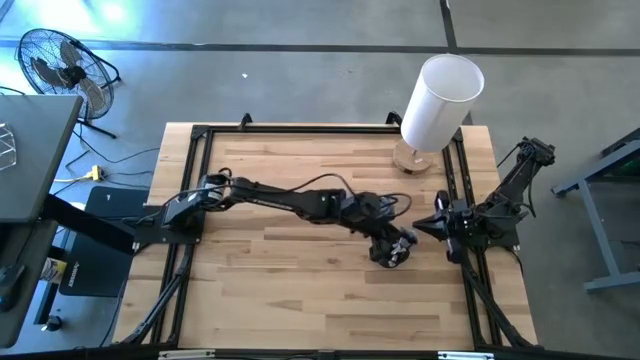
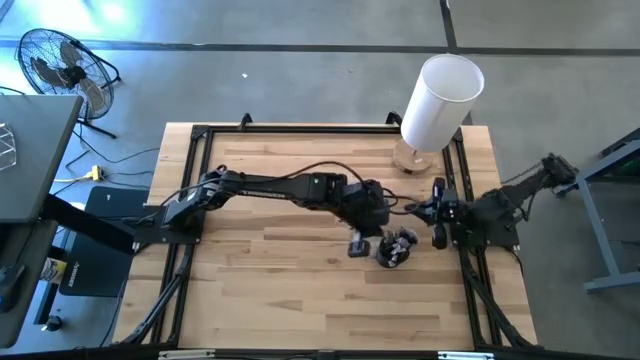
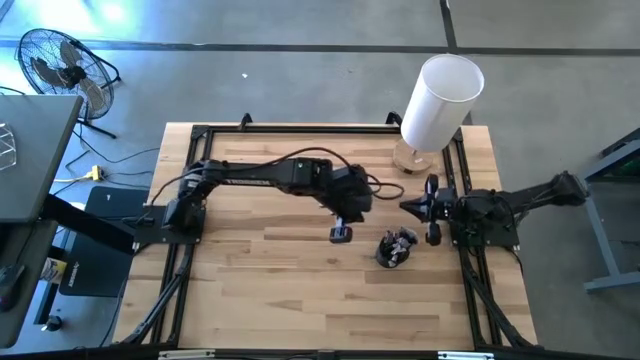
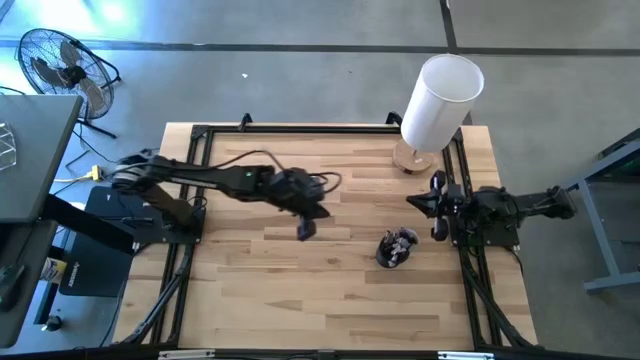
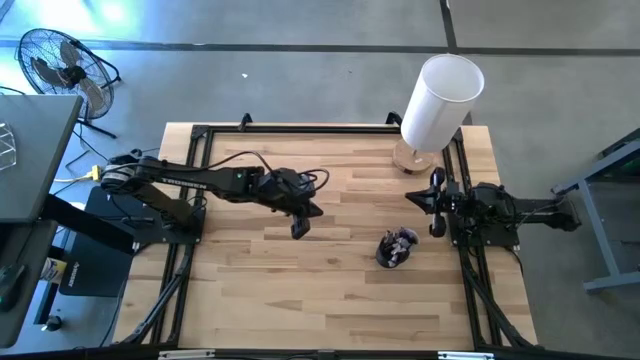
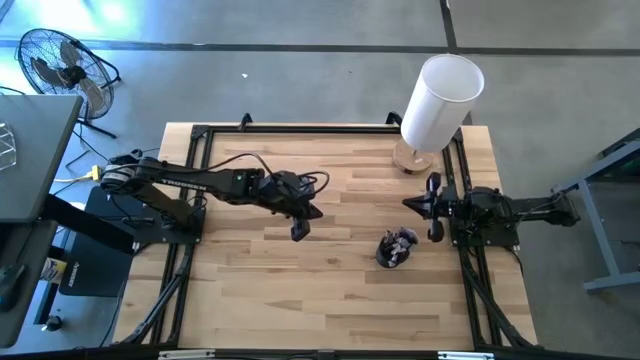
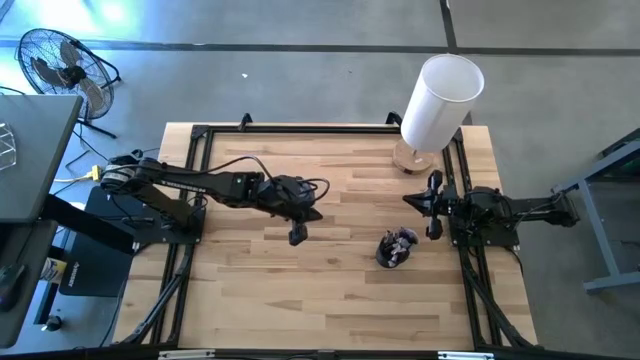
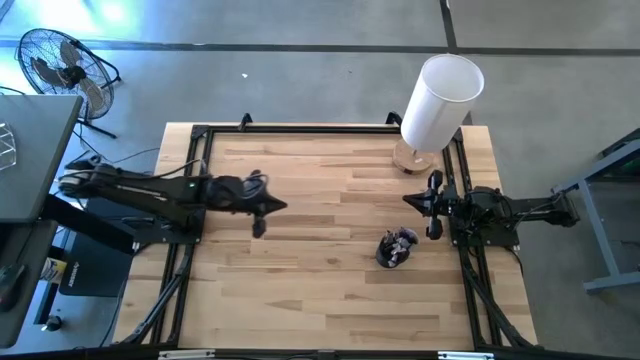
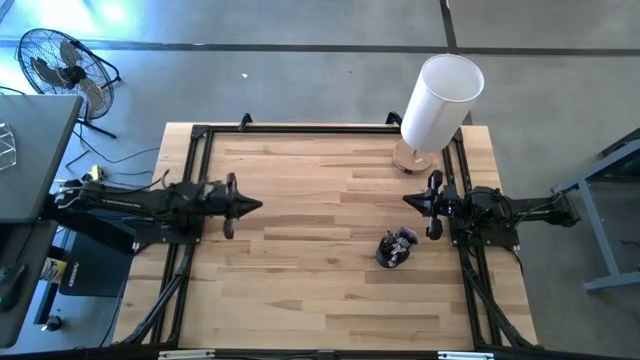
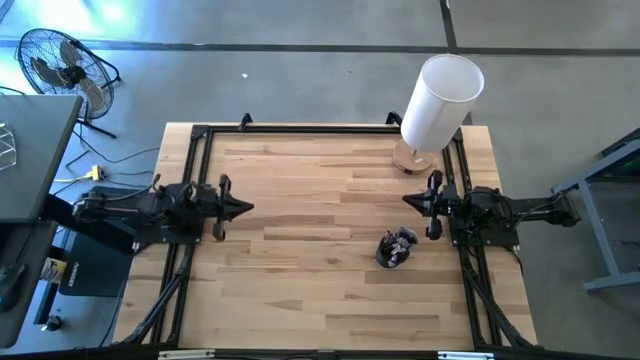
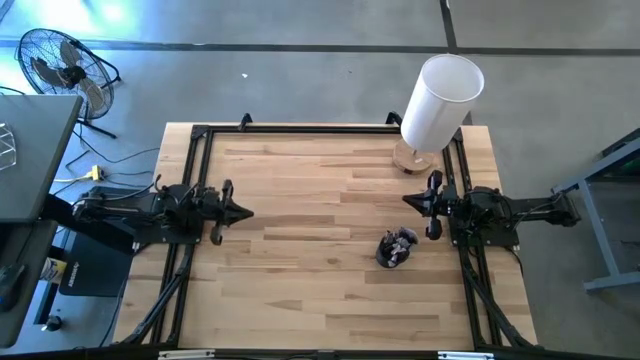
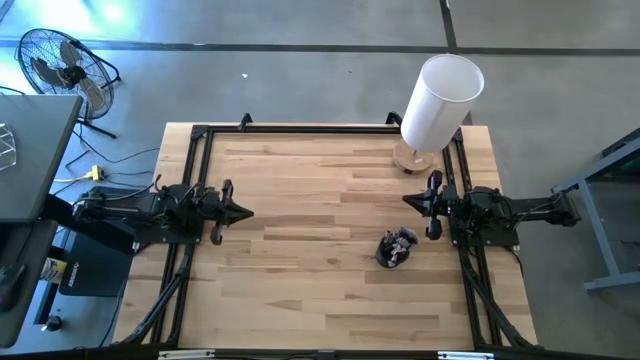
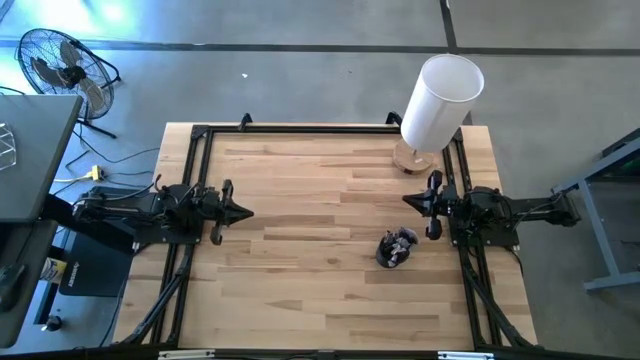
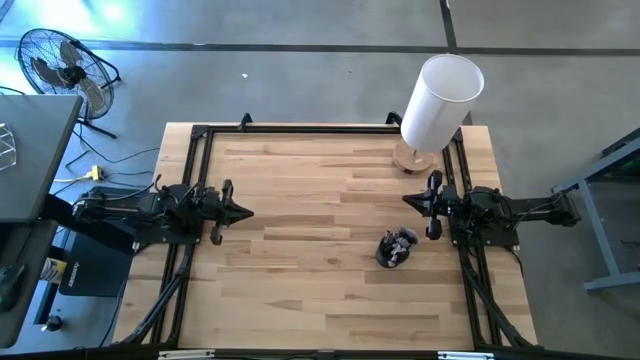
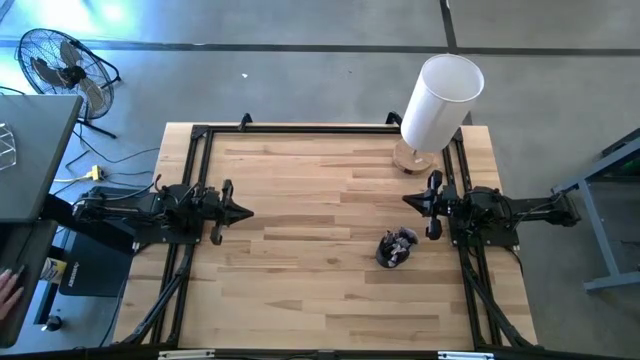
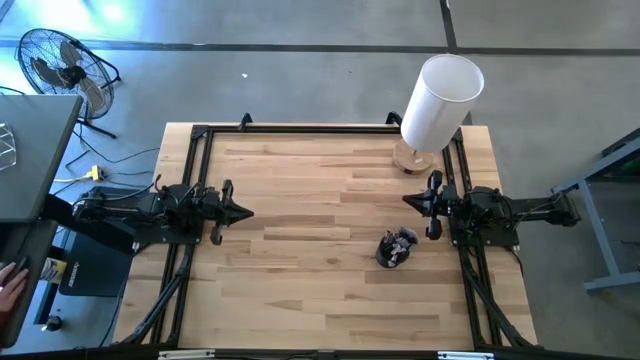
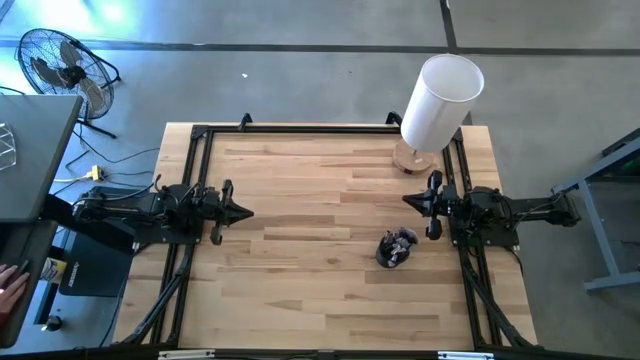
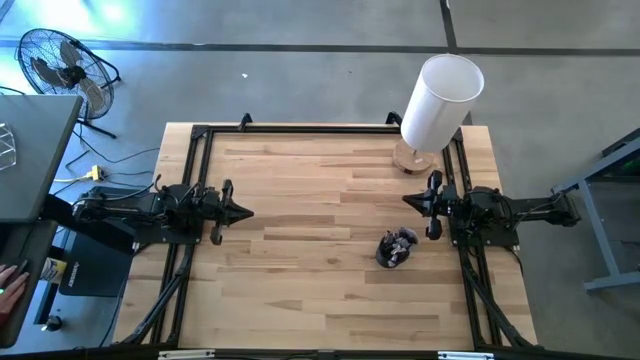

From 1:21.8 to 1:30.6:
Task: Put items in baskets/containers
Return to Home Position

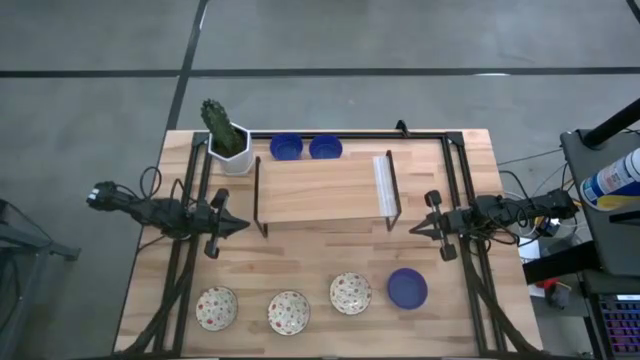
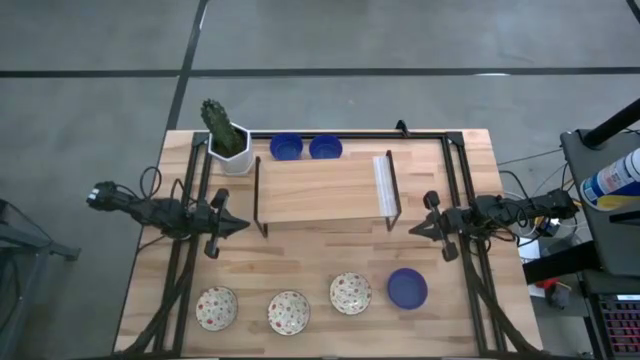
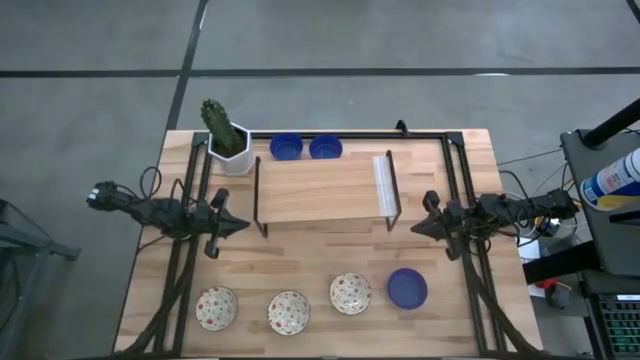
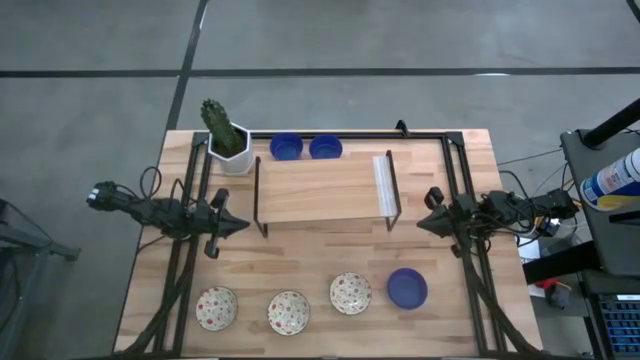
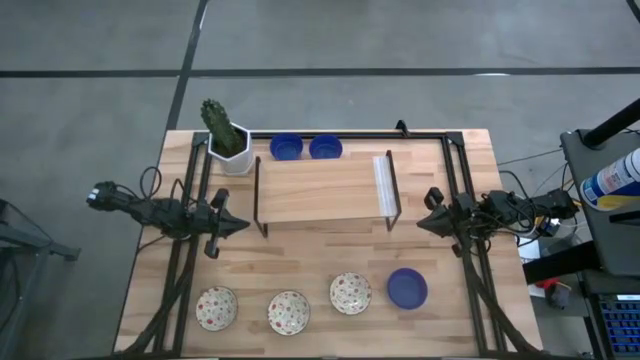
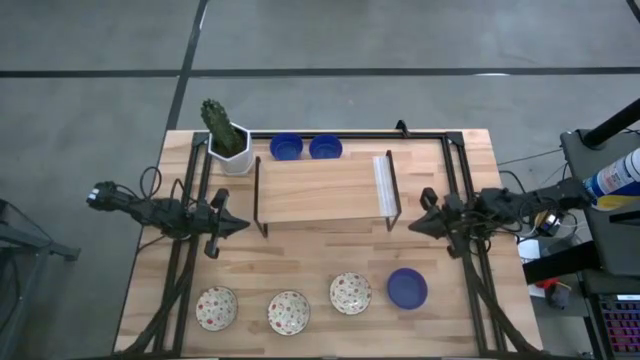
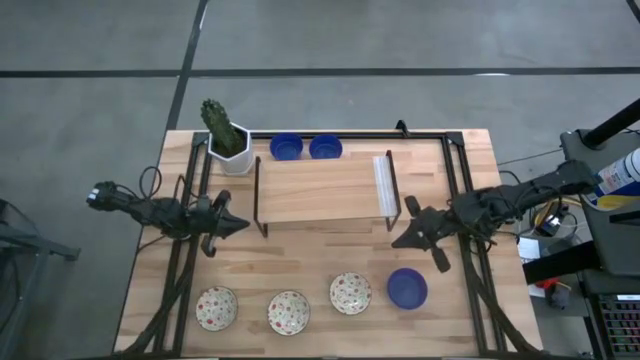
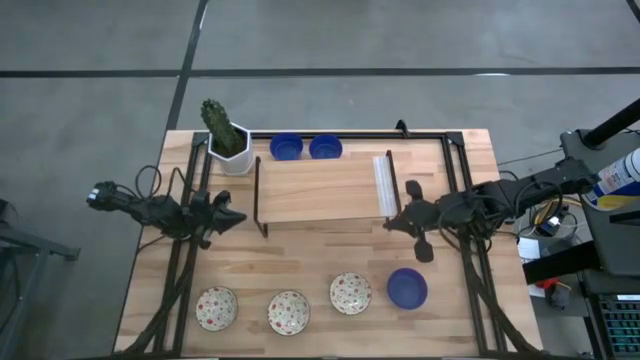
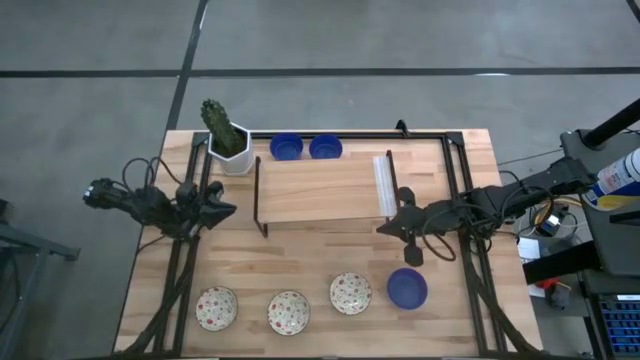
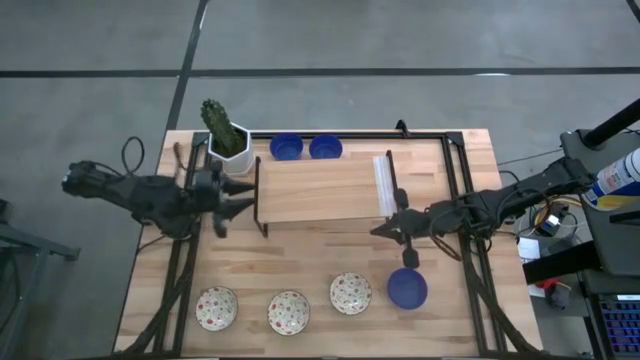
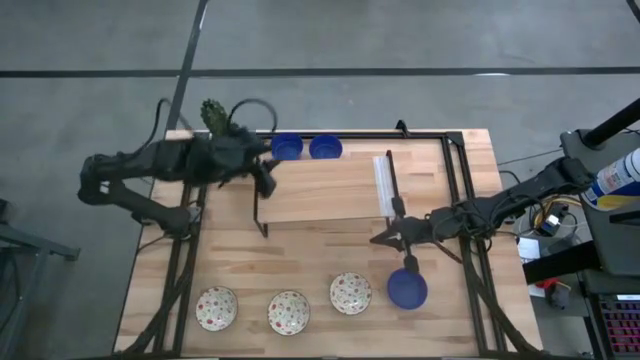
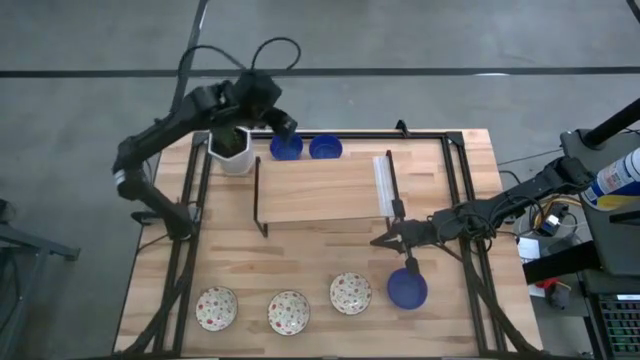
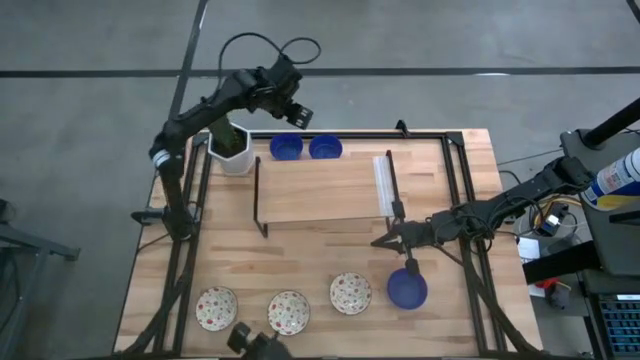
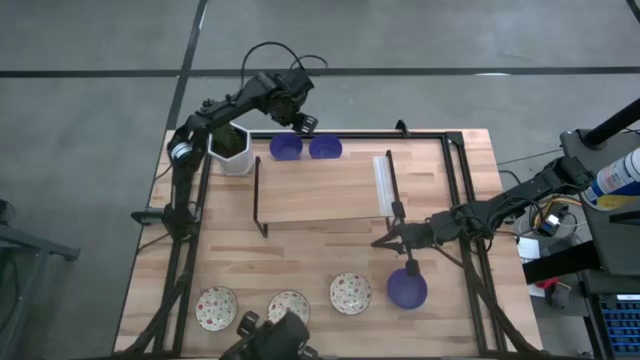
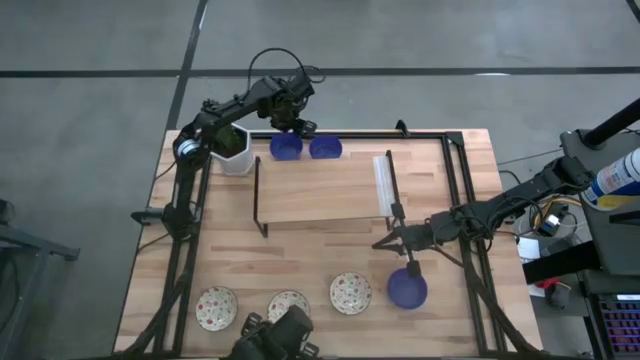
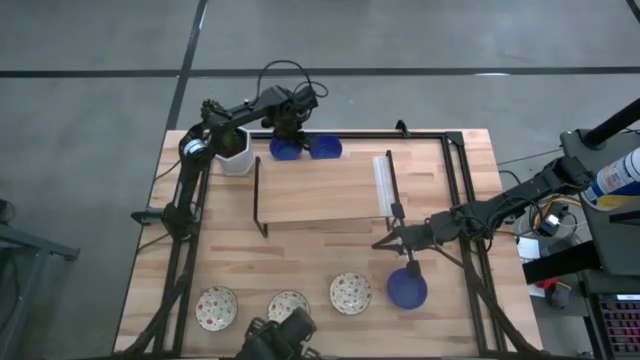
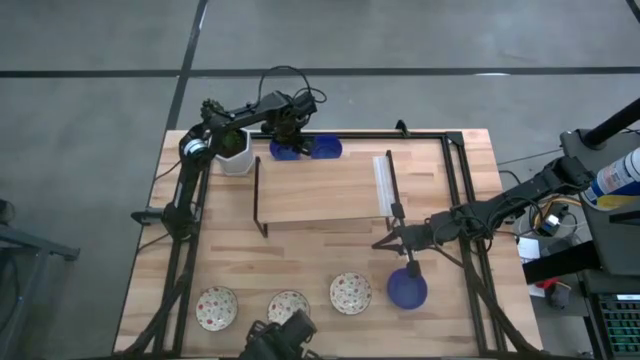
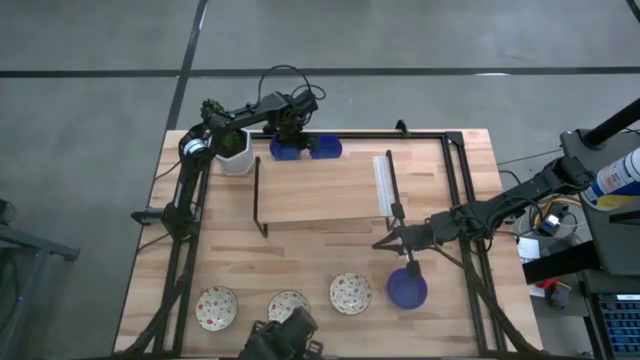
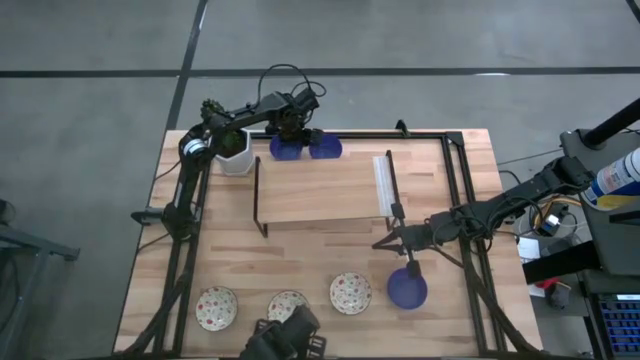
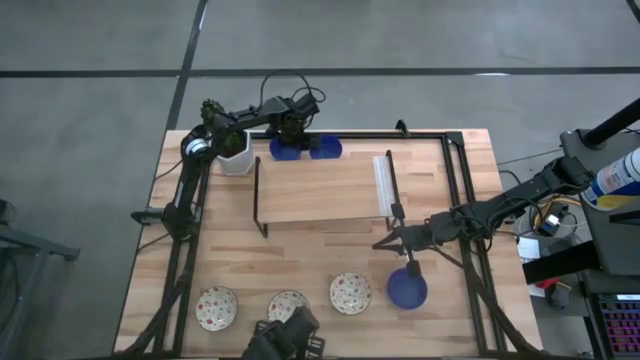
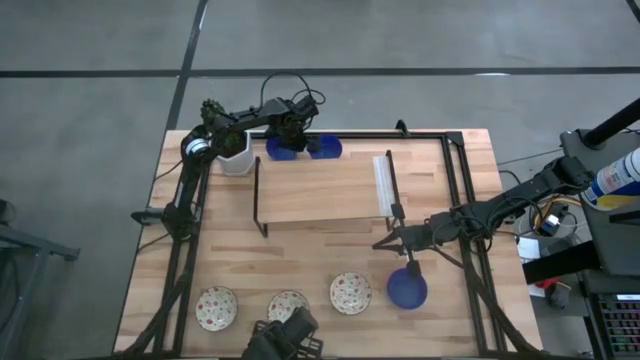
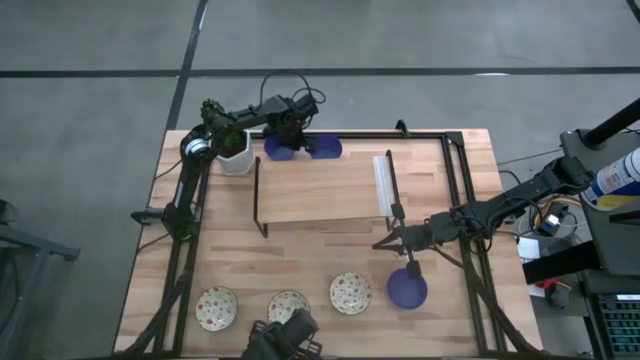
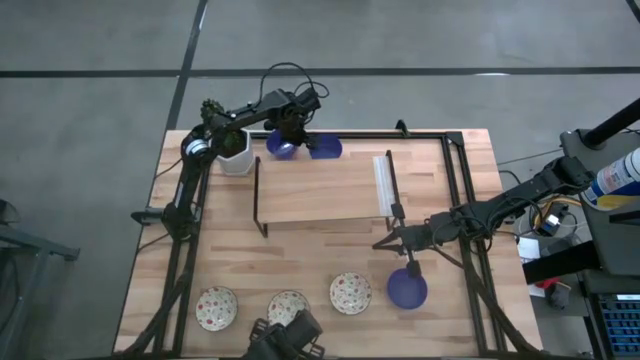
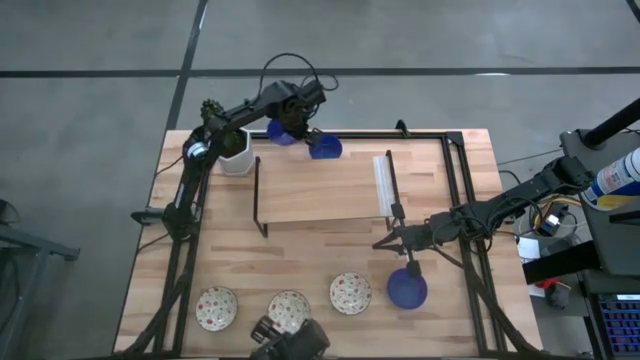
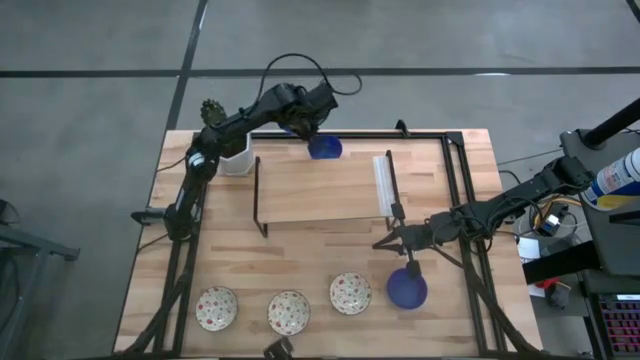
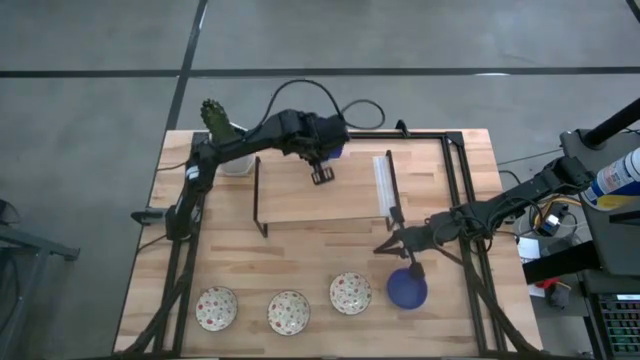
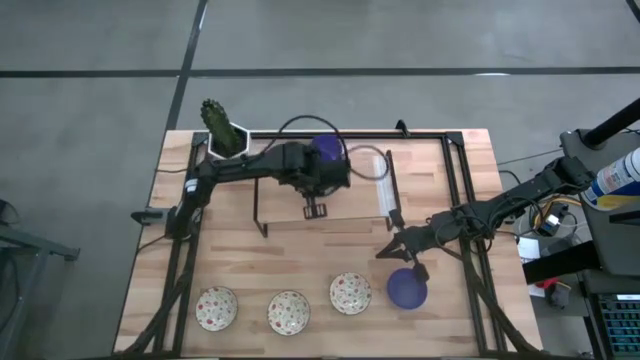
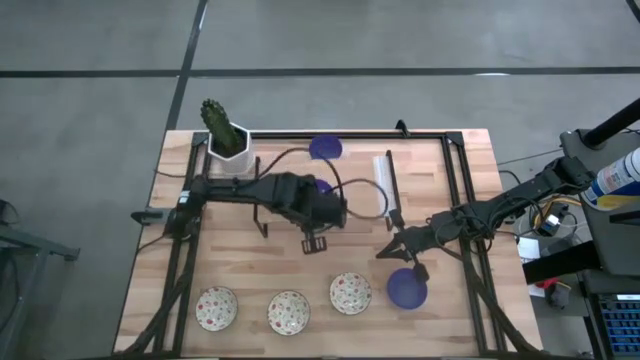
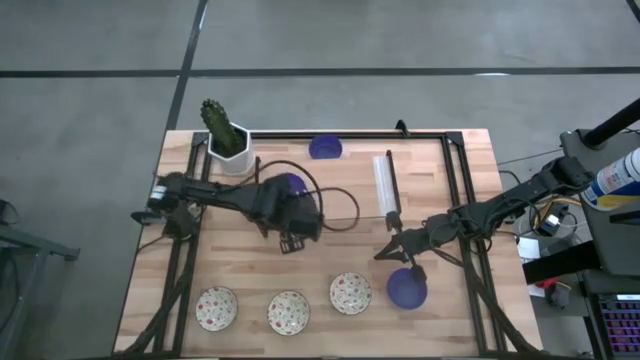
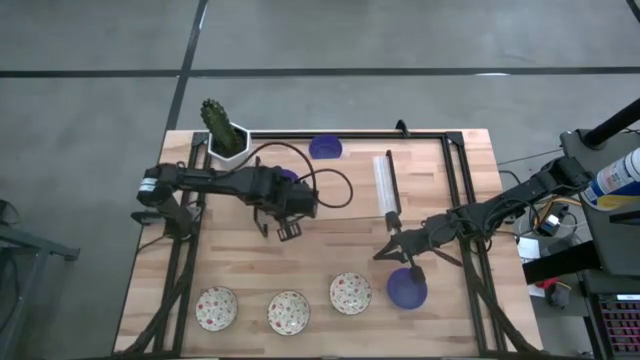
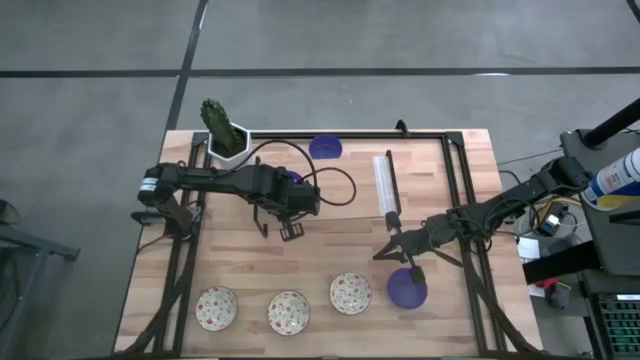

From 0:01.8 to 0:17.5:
Task: Pick & Place Mini bowls
Put the top left blue bowl on the shelf
